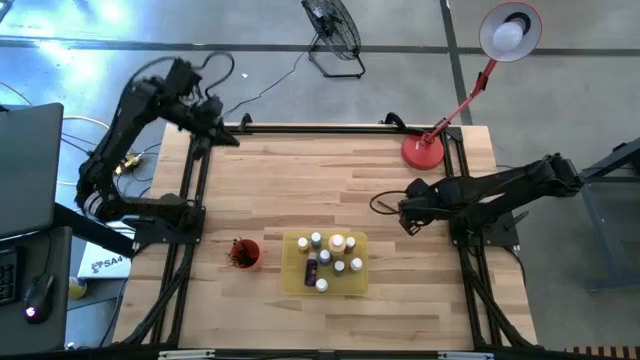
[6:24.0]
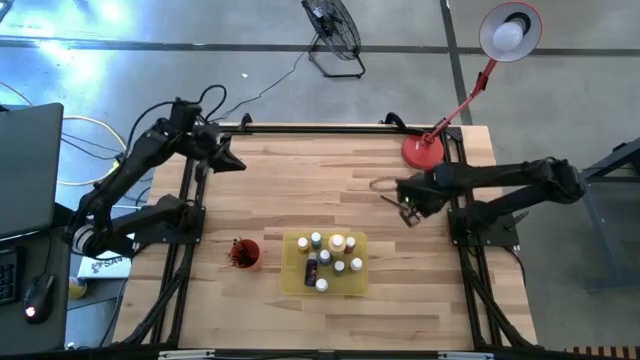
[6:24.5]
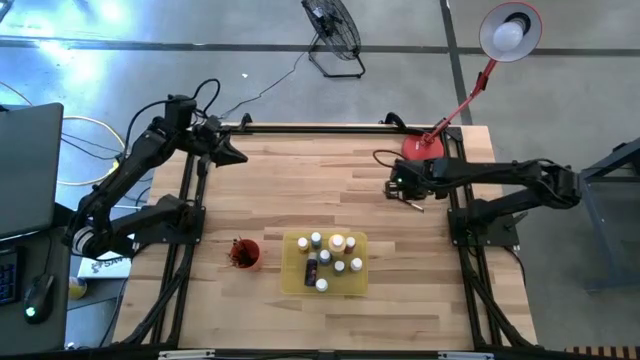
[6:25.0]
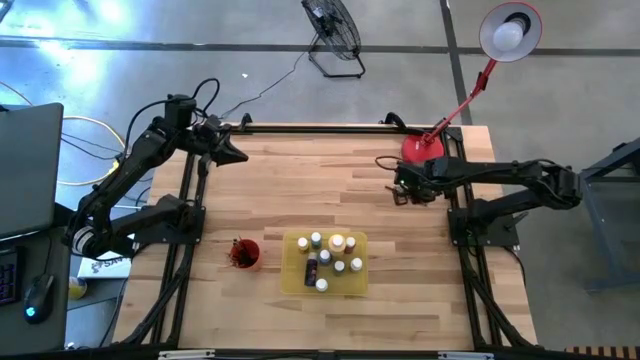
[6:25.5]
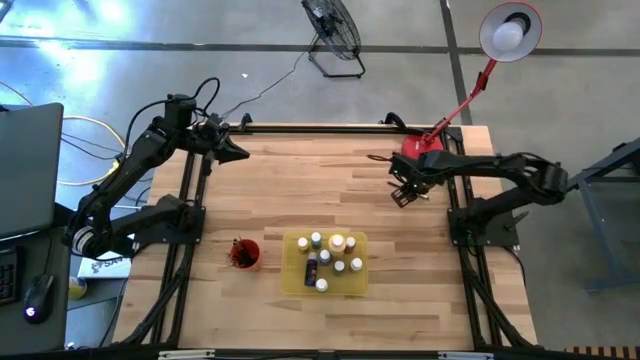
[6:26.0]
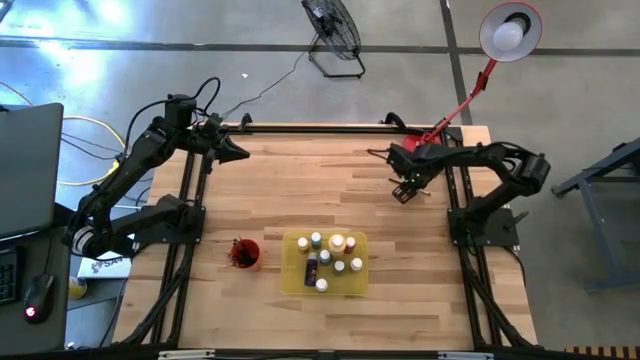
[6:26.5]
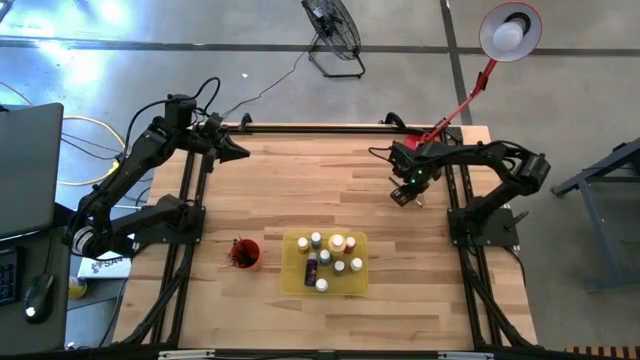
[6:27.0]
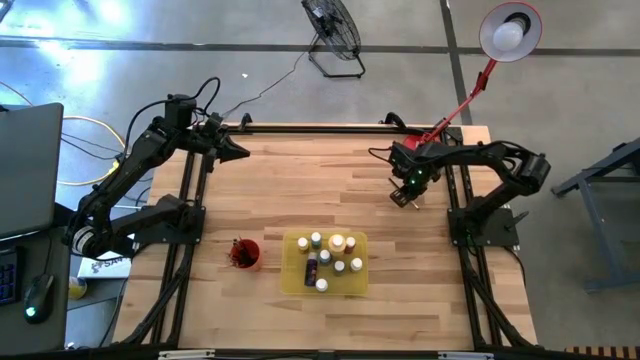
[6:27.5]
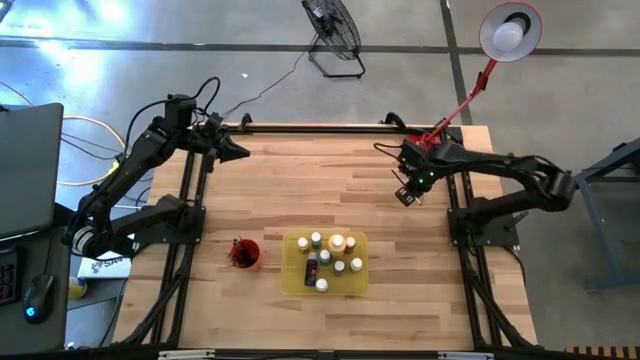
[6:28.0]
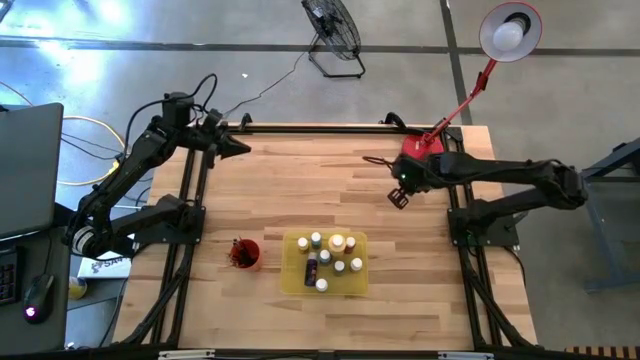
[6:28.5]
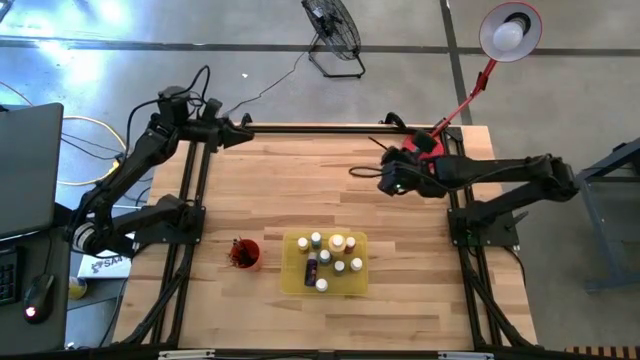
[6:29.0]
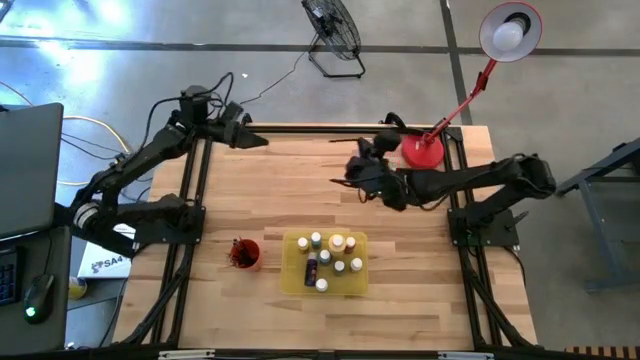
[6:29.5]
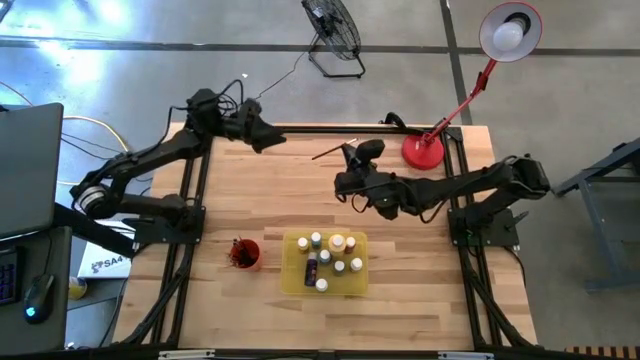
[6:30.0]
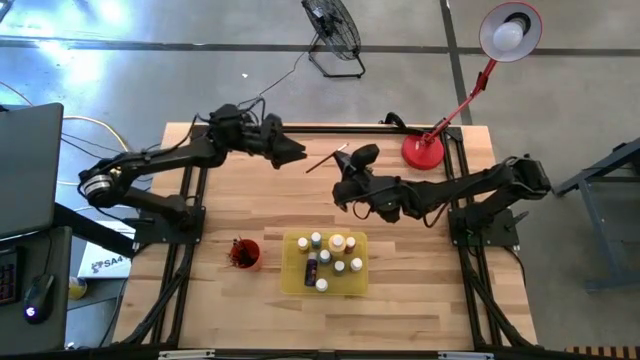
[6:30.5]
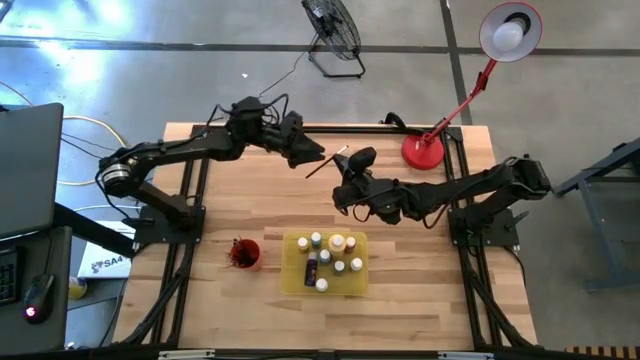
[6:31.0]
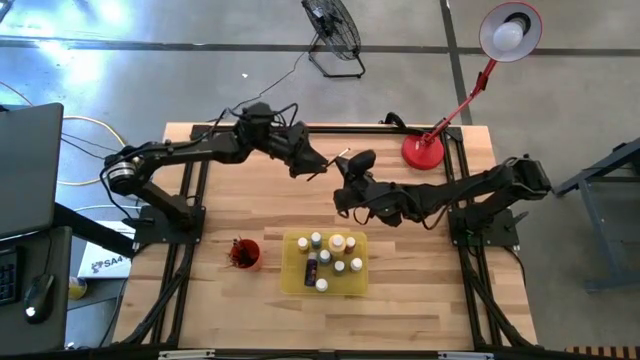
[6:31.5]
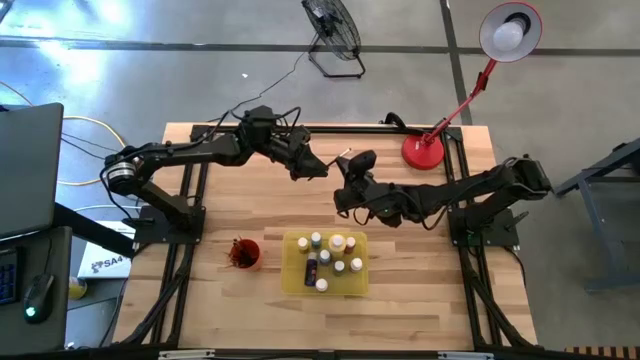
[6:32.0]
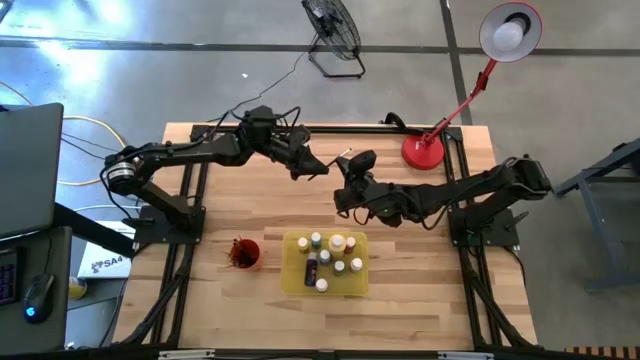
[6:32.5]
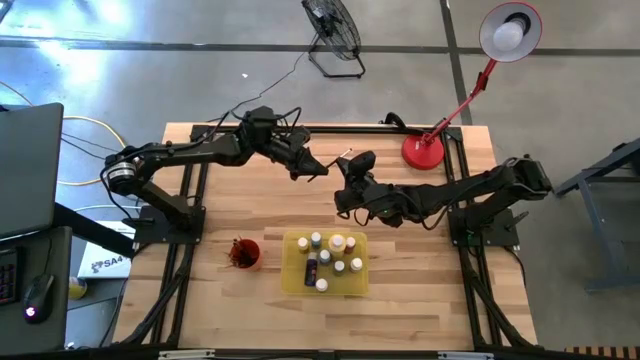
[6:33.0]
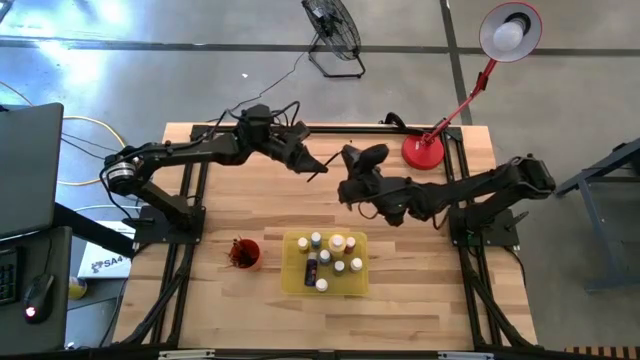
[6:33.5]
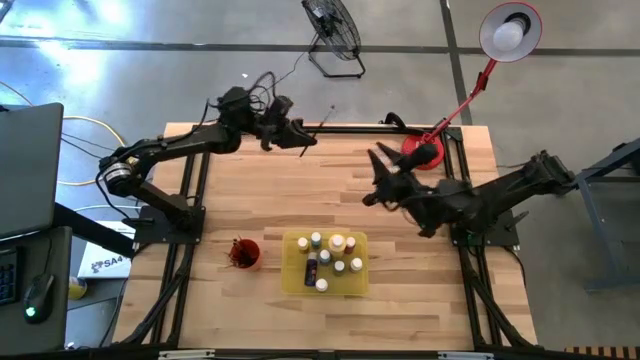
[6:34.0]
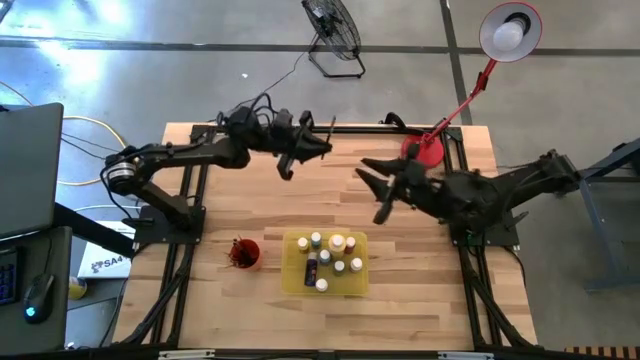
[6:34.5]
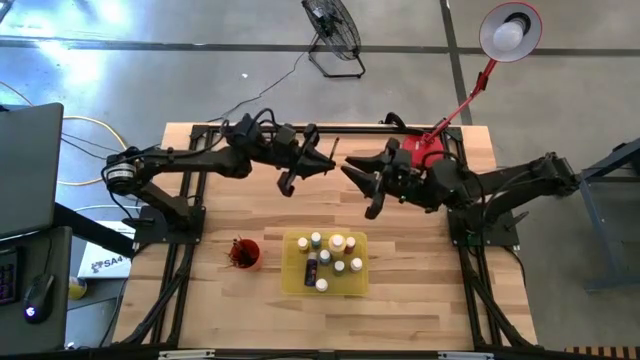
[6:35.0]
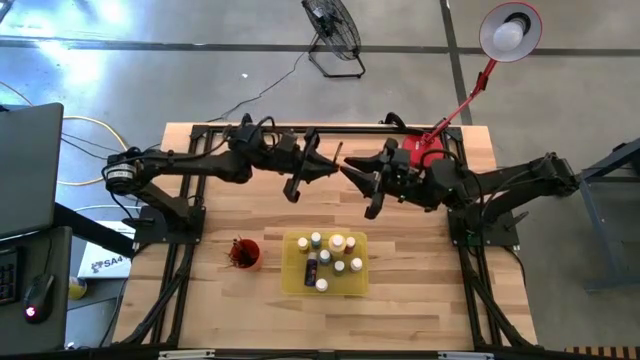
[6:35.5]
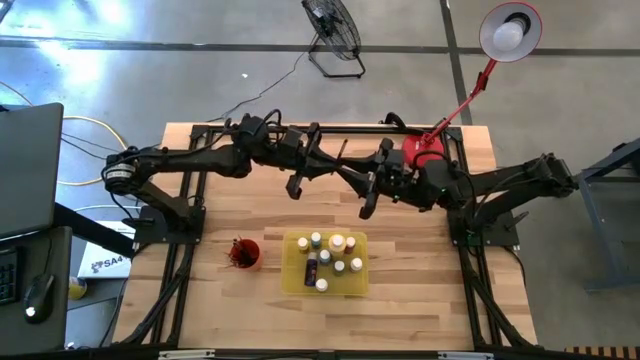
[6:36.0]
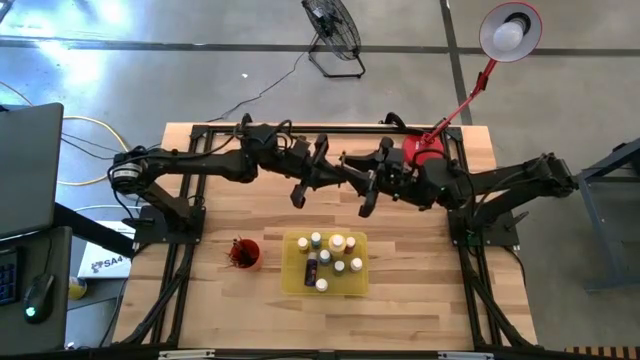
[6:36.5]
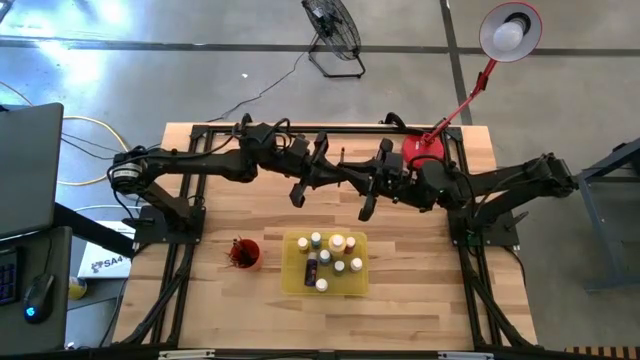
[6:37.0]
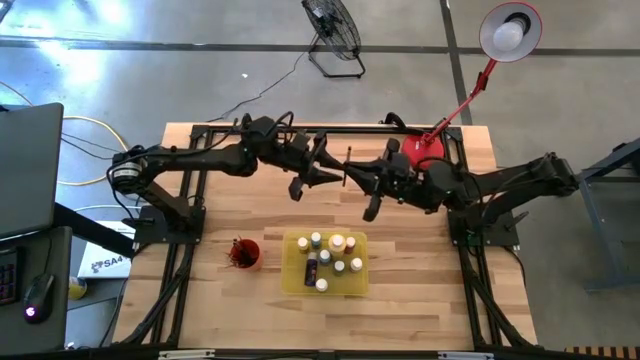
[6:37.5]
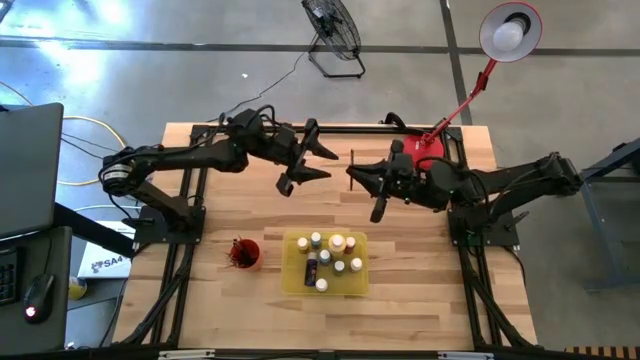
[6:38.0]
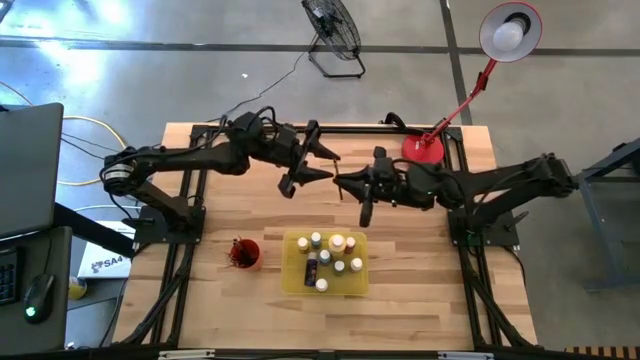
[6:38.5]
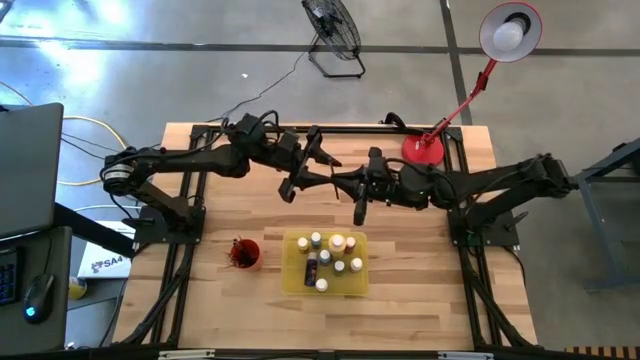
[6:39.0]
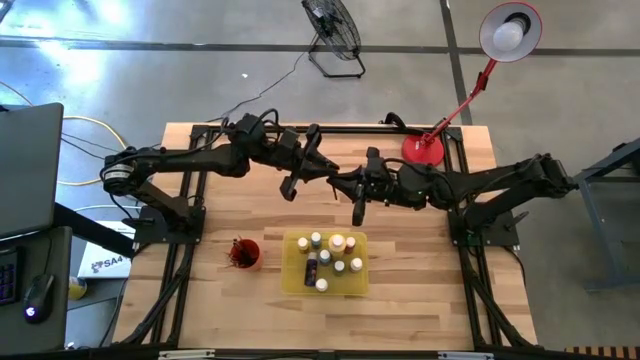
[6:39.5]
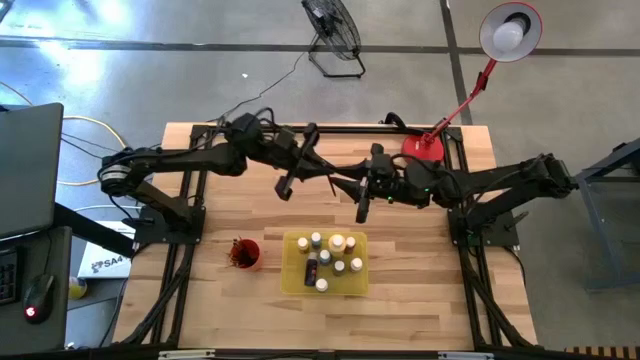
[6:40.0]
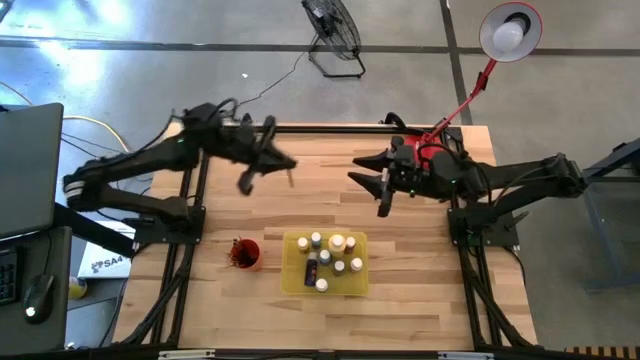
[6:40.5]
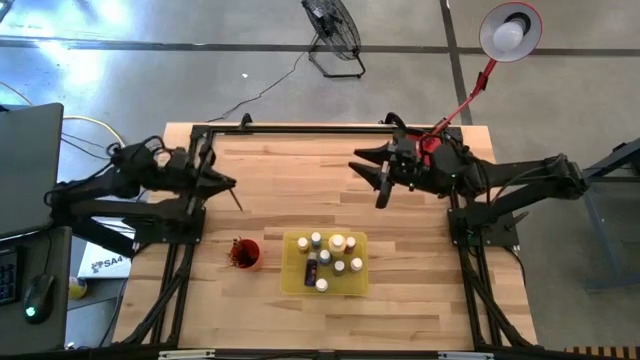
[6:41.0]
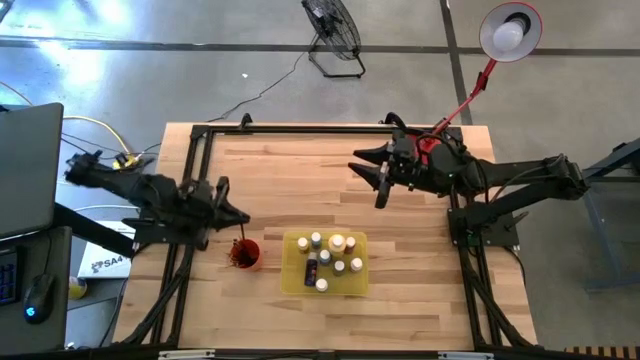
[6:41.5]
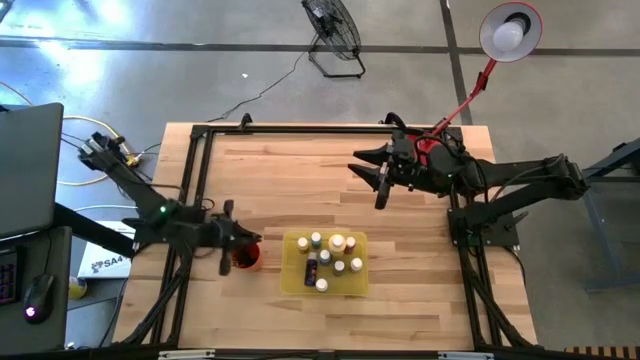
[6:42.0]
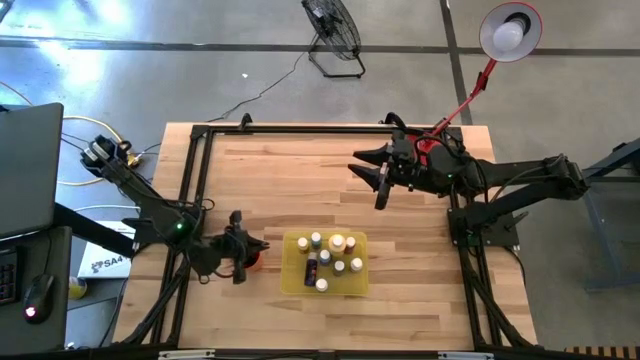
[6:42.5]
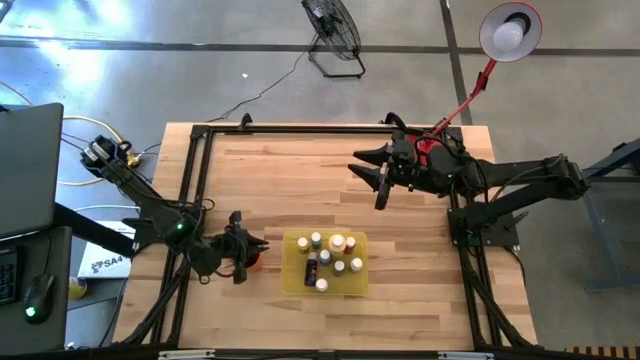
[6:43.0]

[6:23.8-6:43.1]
Task: Pick & Place Paint Supplies
Put the silver paintbrush into the orange cup
